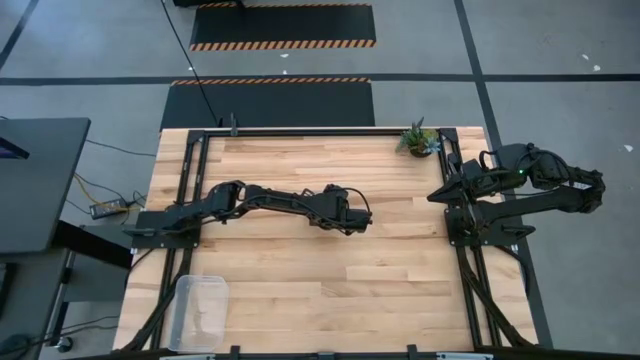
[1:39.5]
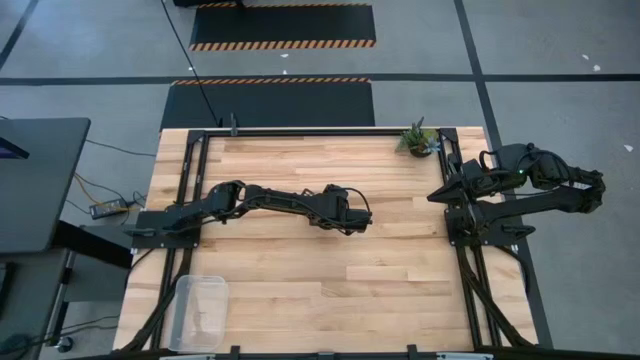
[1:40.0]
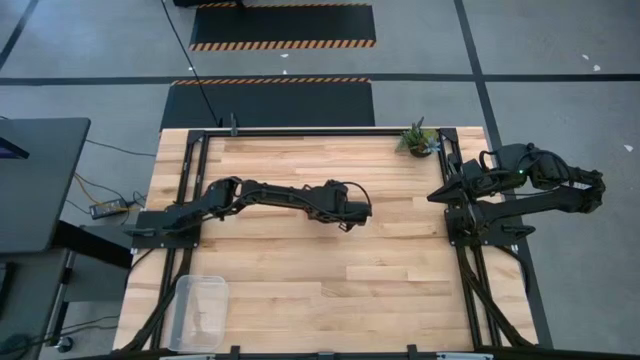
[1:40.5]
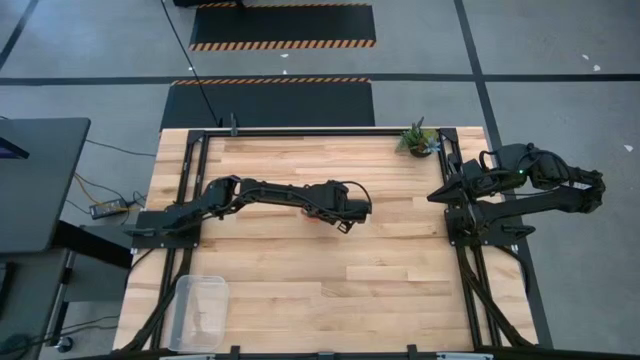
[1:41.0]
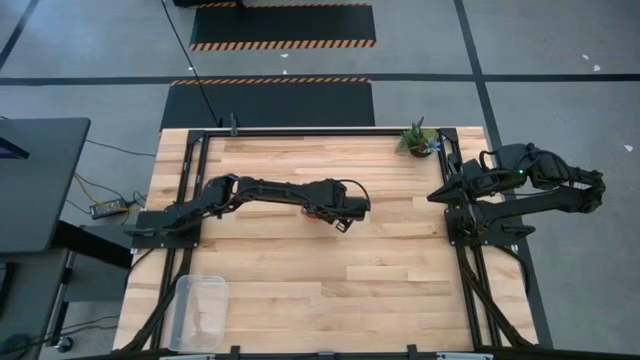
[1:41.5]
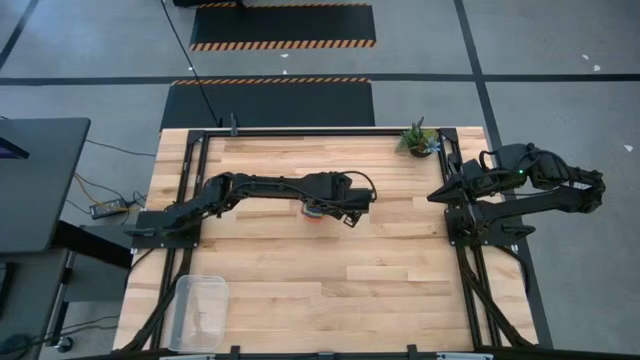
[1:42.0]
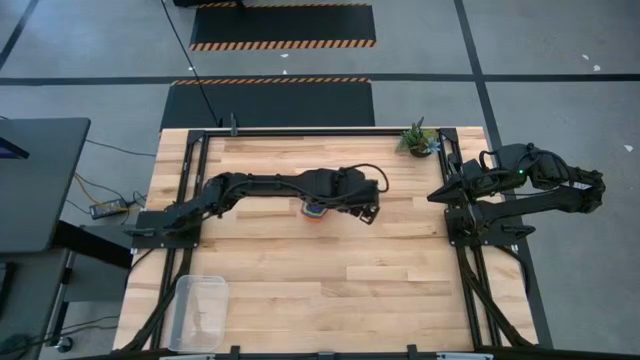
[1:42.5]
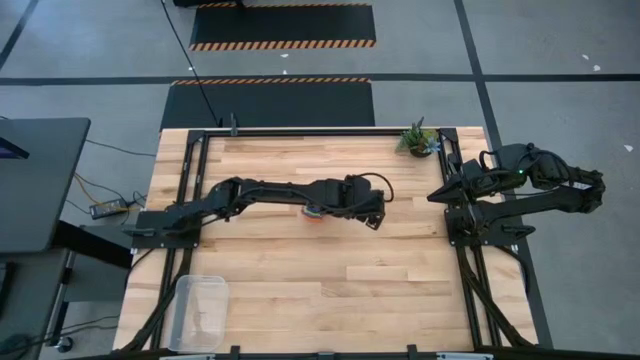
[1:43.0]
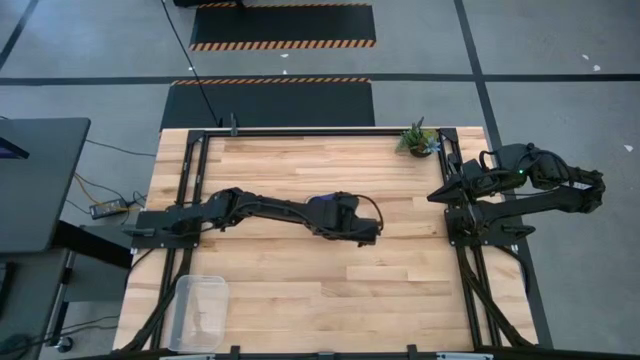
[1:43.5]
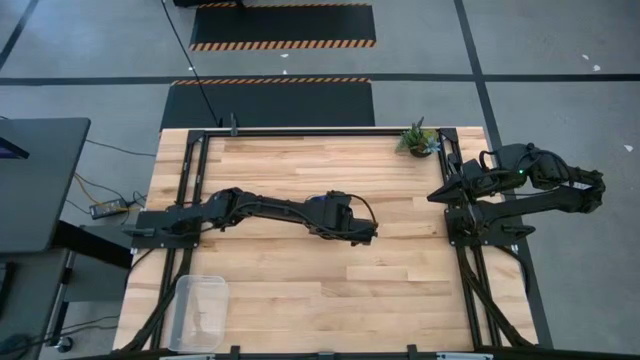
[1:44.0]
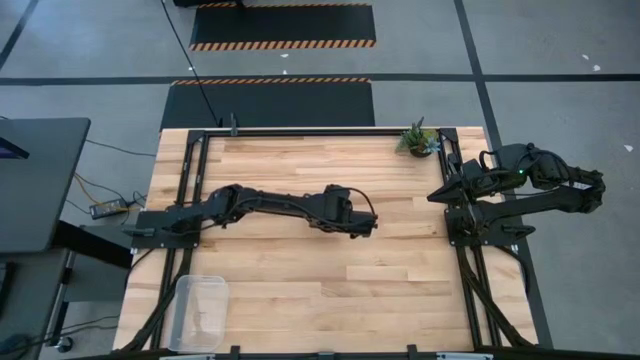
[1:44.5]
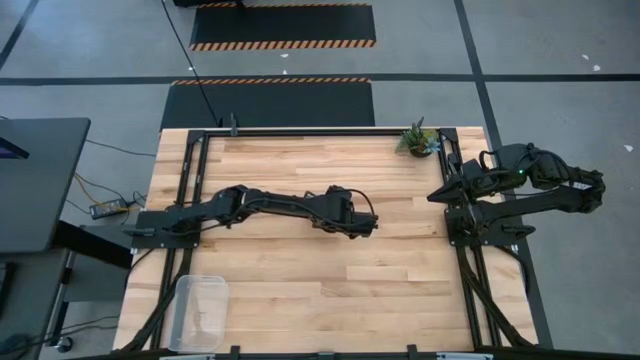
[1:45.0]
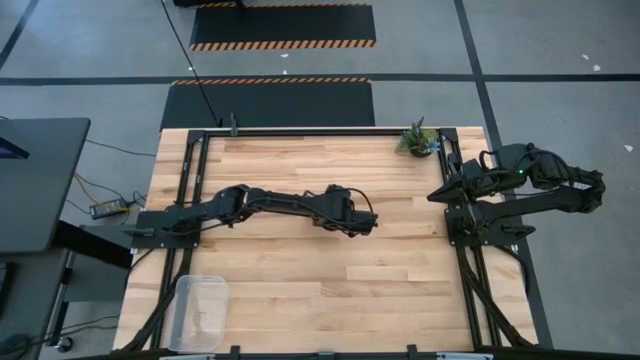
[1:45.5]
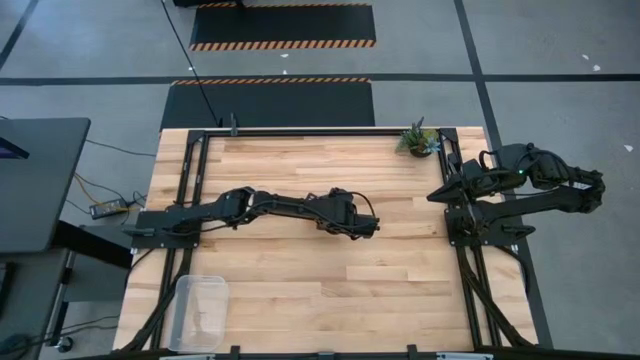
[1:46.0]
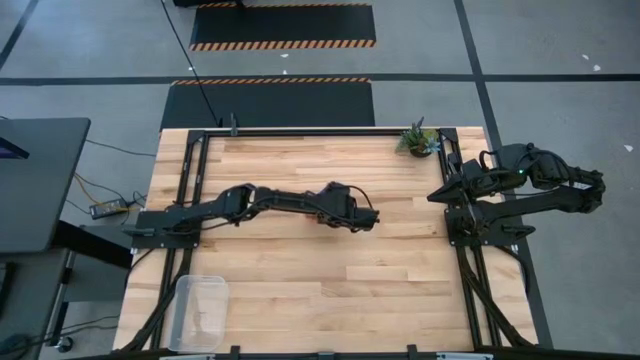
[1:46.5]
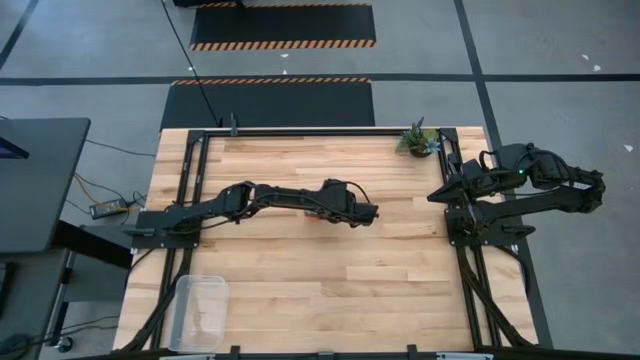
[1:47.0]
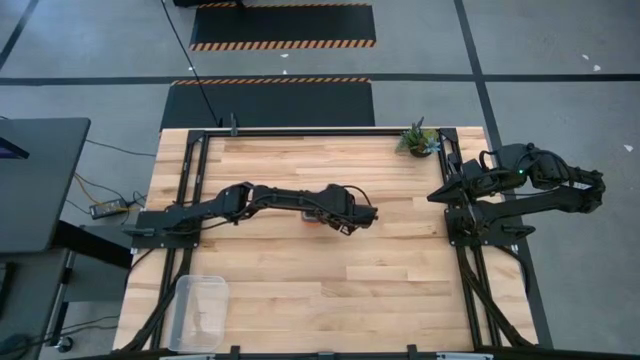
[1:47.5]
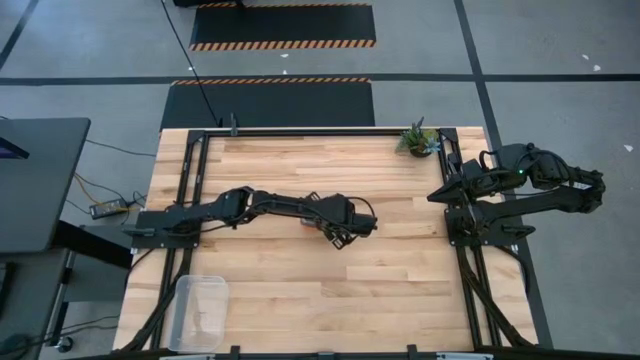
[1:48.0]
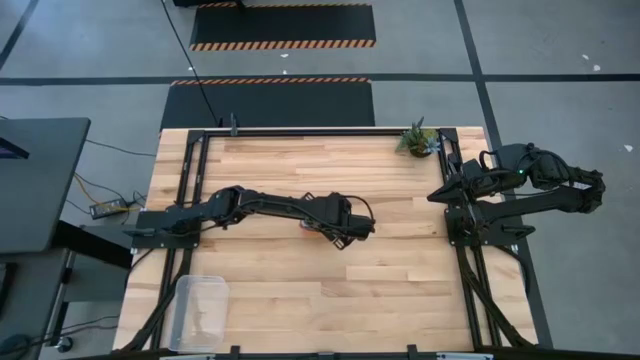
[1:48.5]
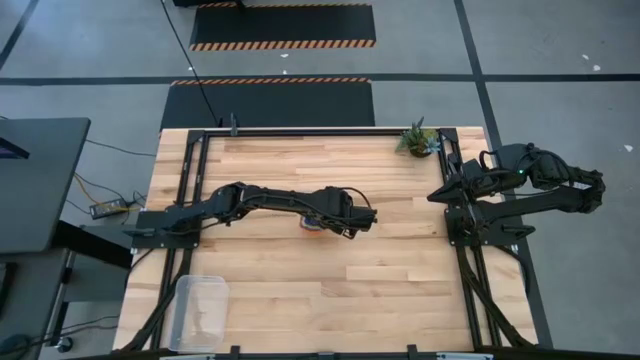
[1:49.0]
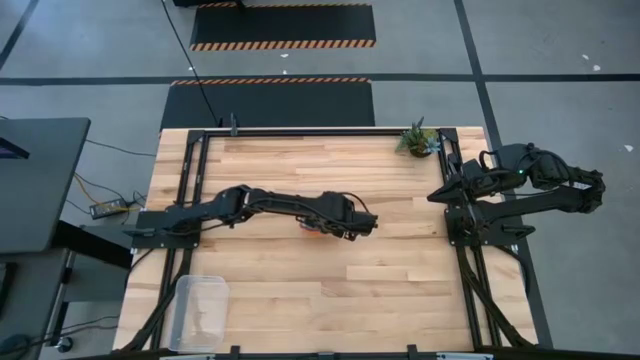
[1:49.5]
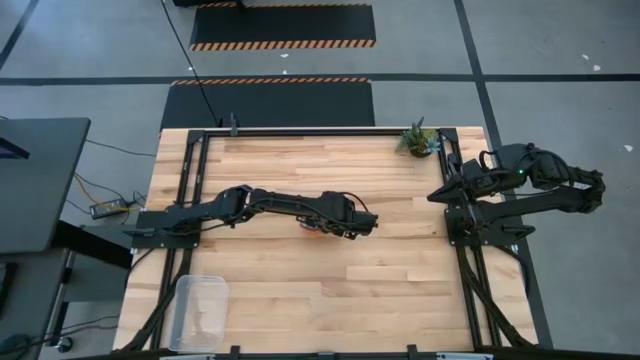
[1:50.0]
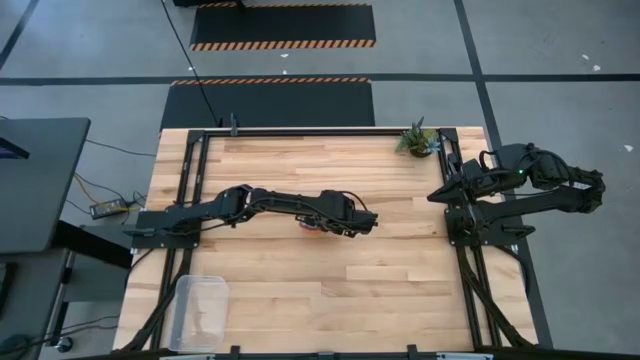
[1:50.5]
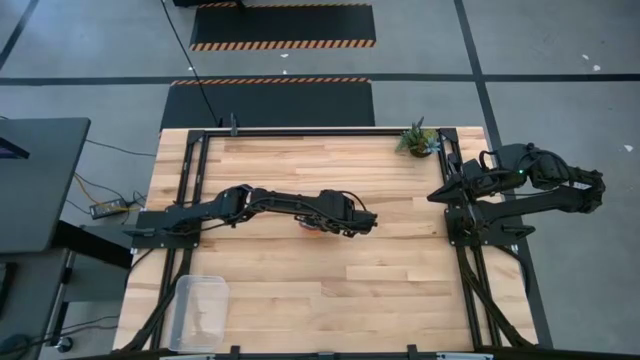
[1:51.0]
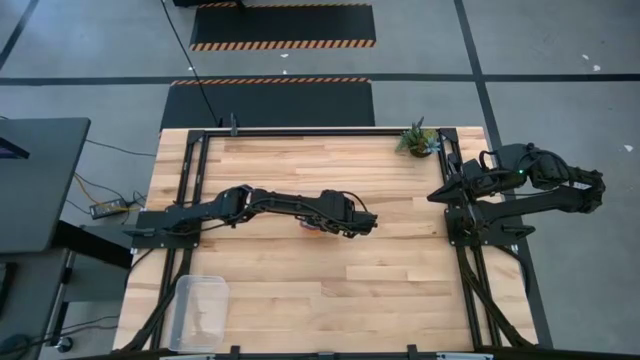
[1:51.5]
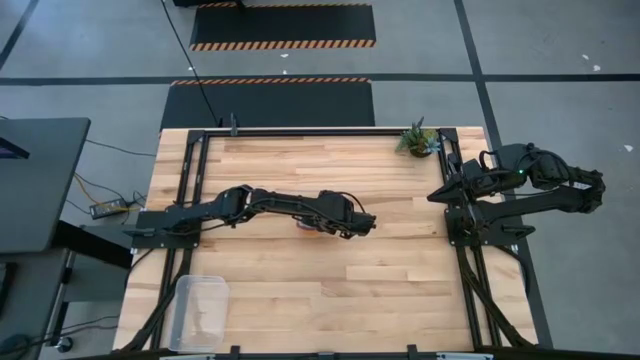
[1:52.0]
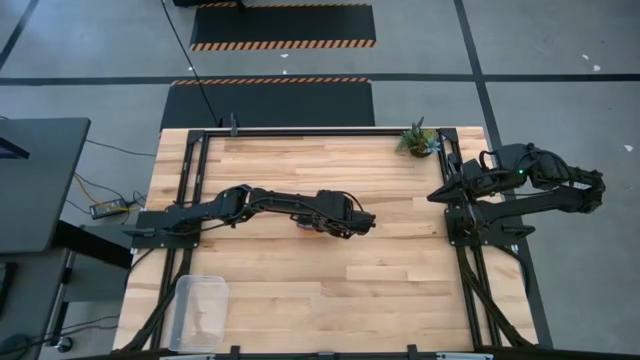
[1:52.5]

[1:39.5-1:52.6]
Task: Nest measuring cups in basket
Put the stacked measuring cups into the transparent bin

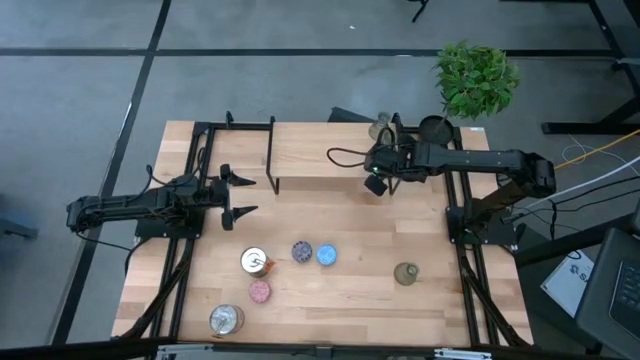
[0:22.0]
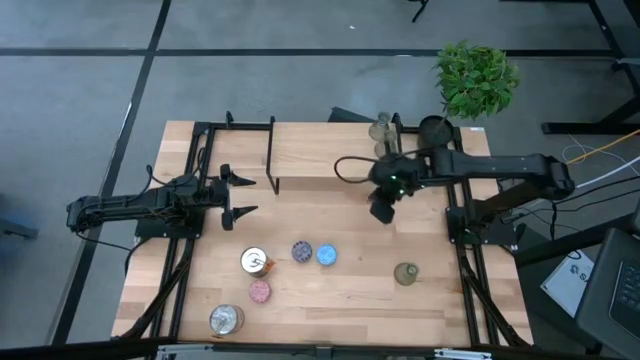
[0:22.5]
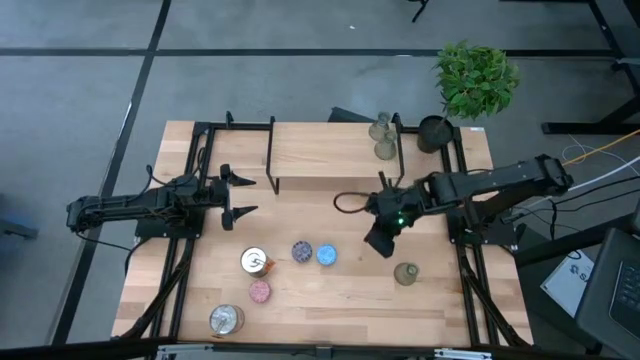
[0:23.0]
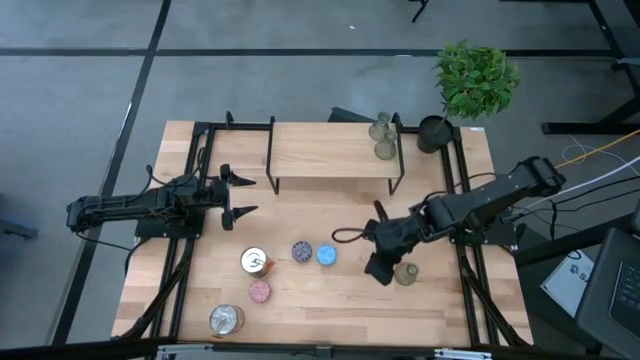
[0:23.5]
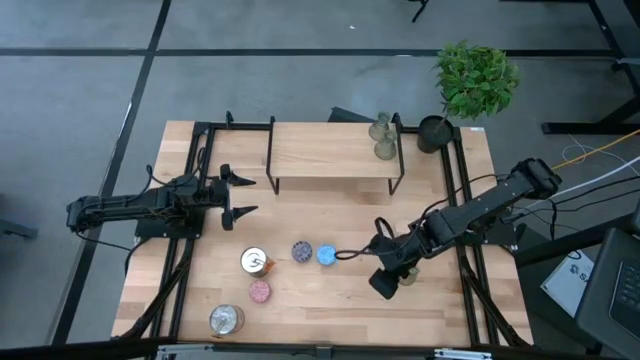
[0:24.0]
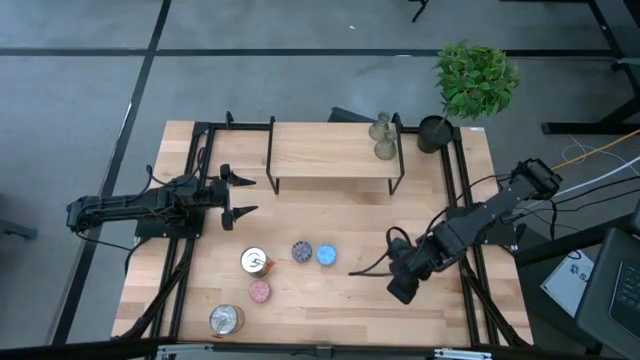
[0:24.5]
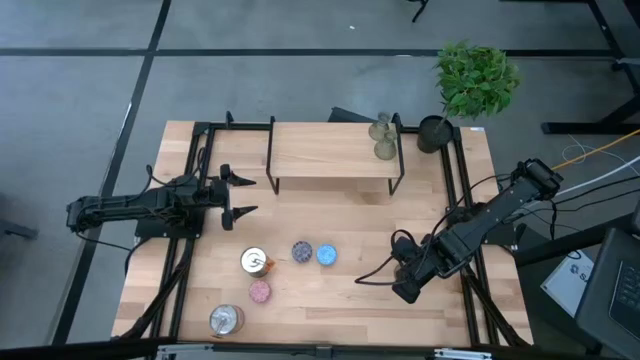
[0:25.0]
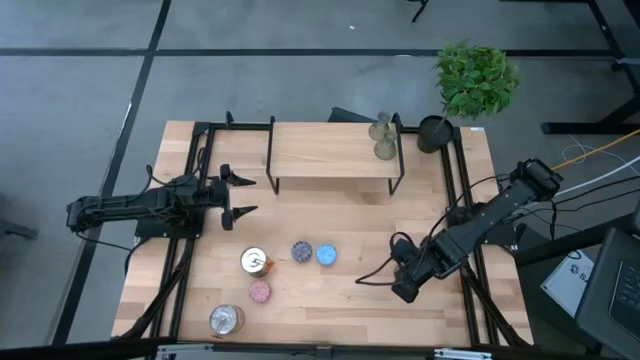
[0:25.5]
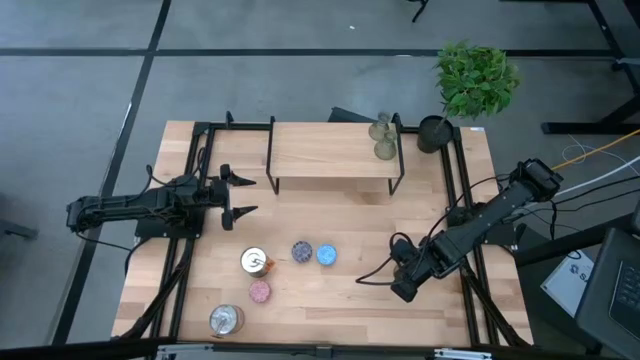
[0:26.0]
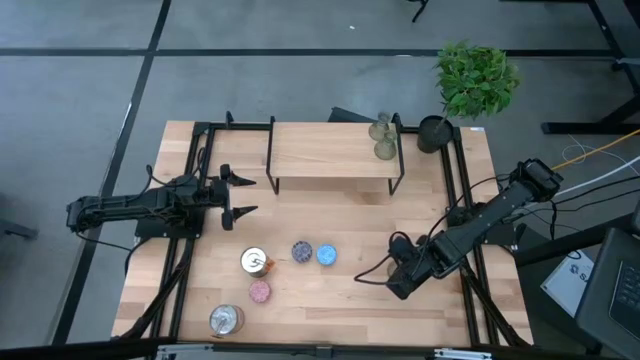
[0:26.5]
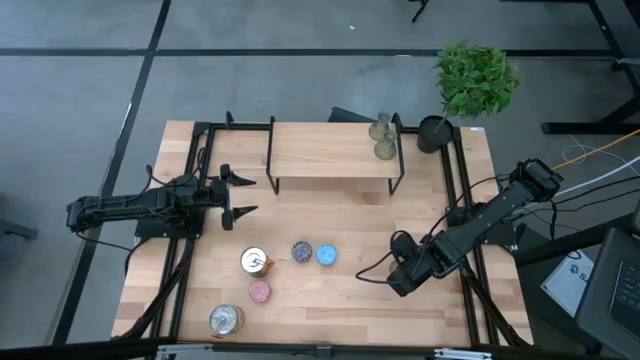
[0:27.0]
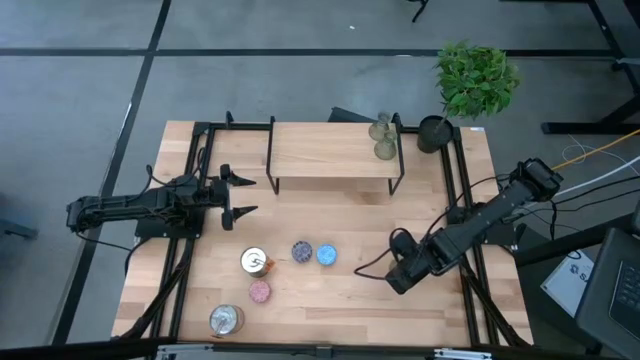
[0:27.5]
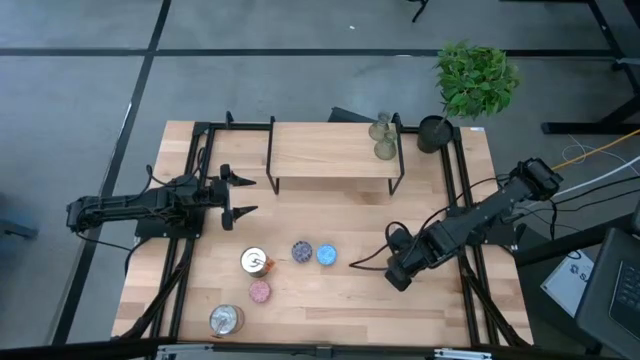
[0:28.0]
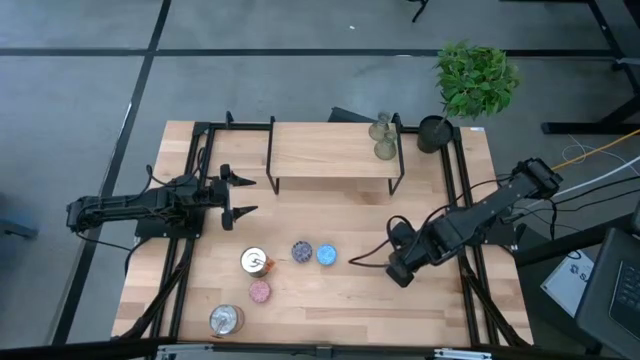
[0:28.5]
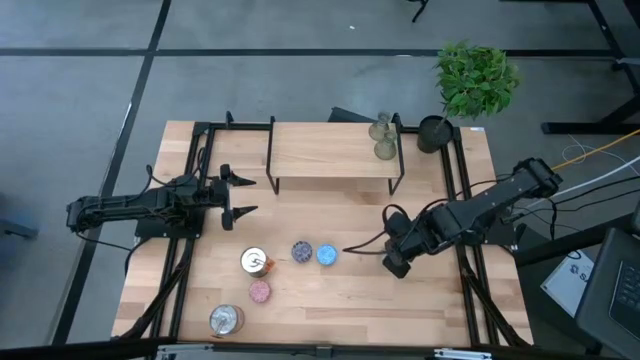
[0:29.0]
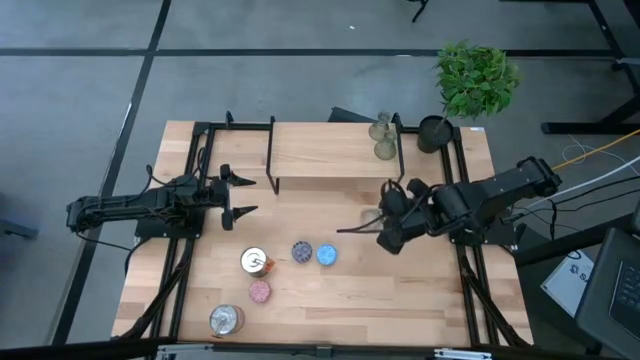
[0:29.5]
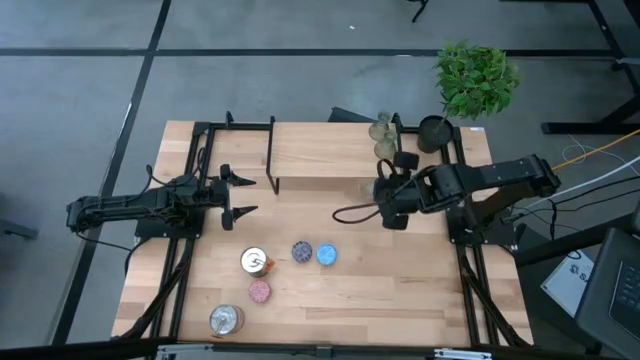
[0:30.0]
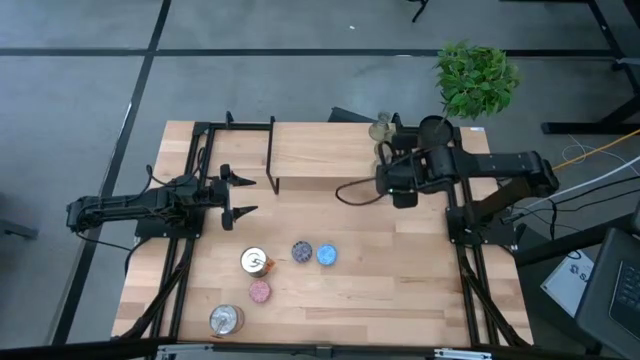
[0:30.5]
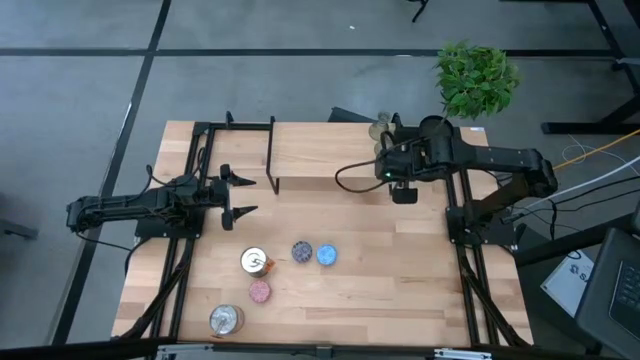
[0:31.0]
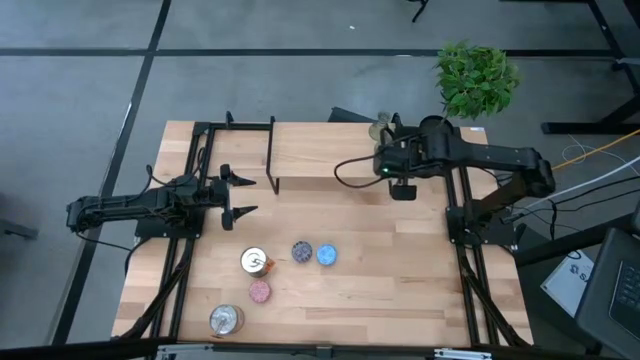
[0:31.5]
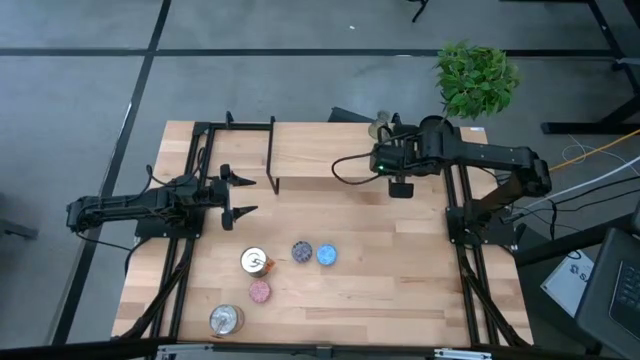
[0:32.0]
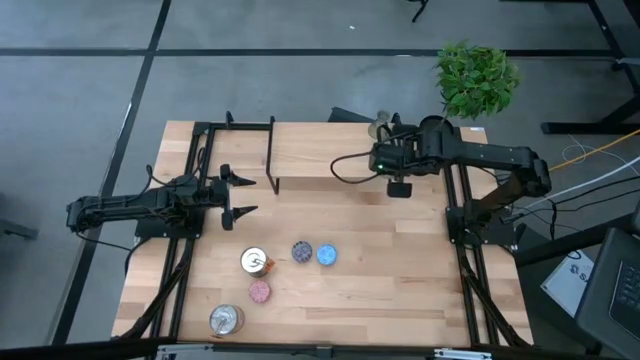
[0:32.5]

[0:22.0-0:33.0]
Task: Pick & Place candle stick holders
Put the transparent glass candle holder on the shelf aligned with the other transparent glass candle holder
